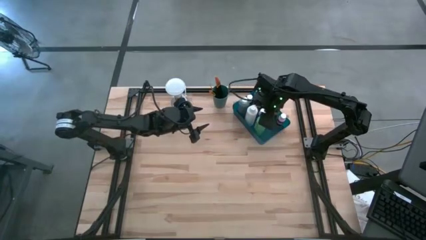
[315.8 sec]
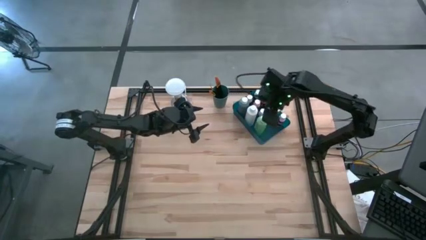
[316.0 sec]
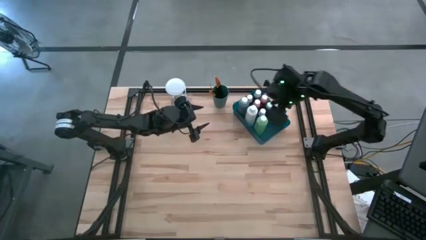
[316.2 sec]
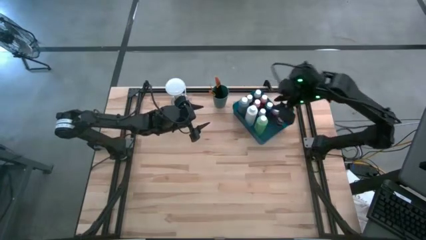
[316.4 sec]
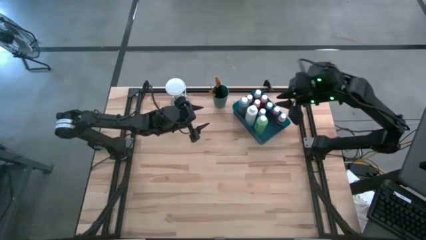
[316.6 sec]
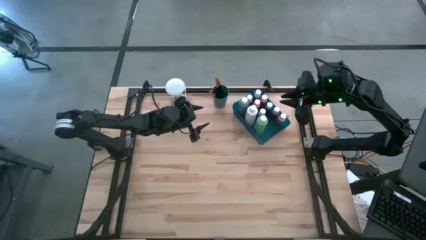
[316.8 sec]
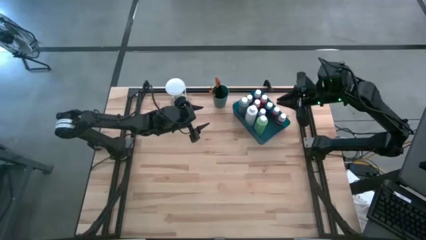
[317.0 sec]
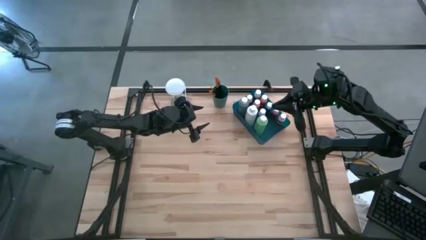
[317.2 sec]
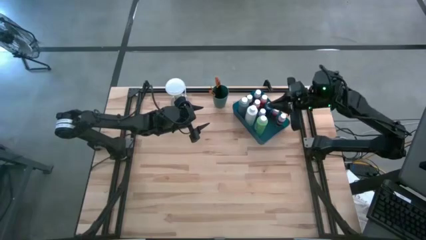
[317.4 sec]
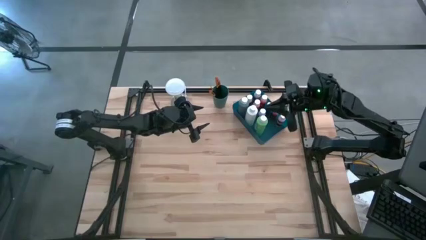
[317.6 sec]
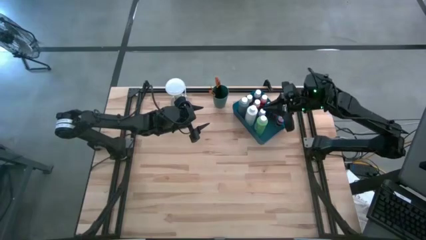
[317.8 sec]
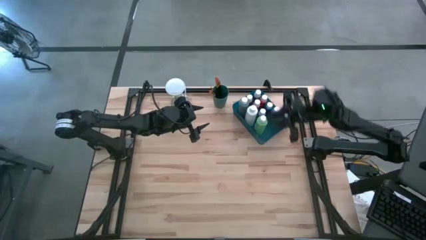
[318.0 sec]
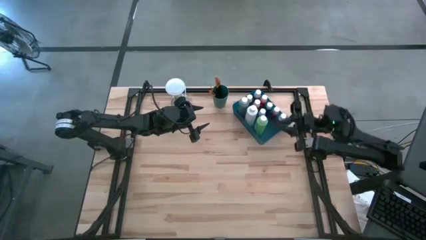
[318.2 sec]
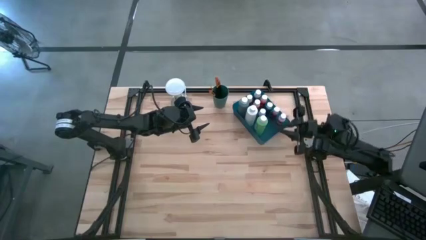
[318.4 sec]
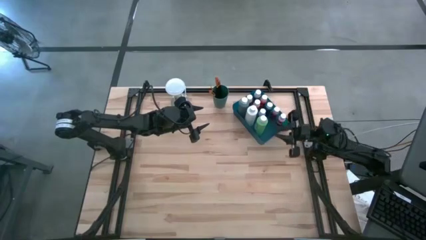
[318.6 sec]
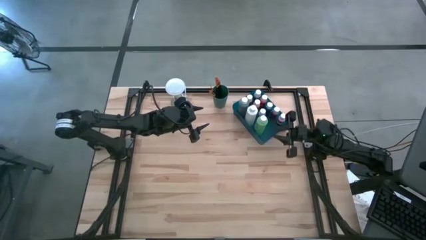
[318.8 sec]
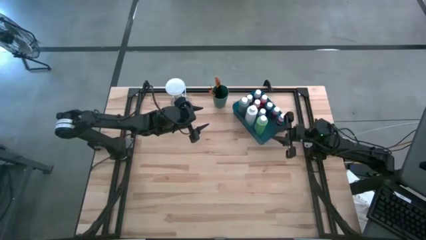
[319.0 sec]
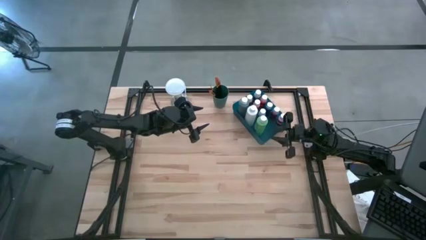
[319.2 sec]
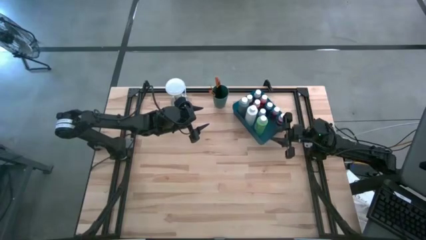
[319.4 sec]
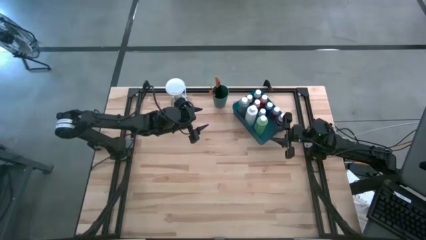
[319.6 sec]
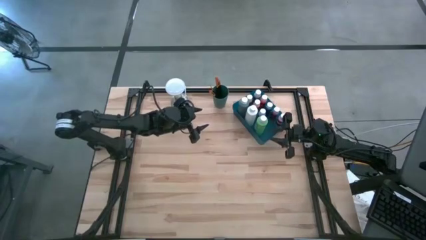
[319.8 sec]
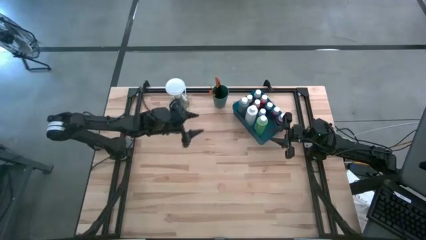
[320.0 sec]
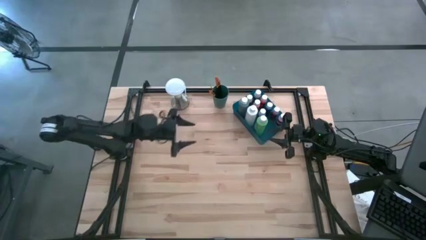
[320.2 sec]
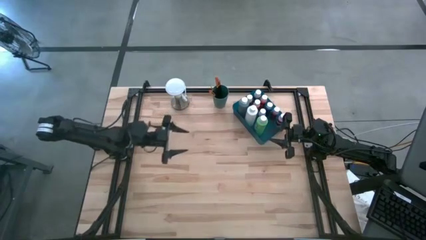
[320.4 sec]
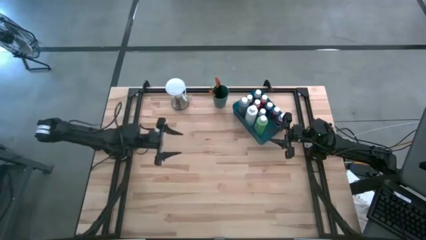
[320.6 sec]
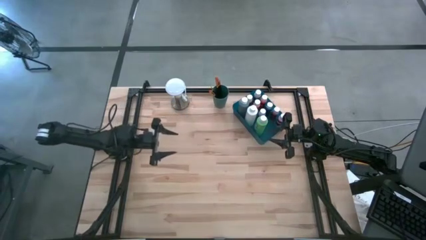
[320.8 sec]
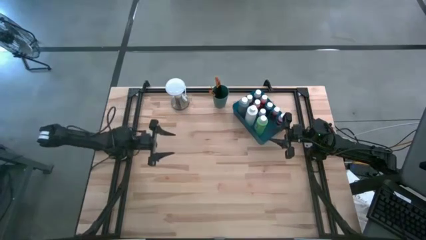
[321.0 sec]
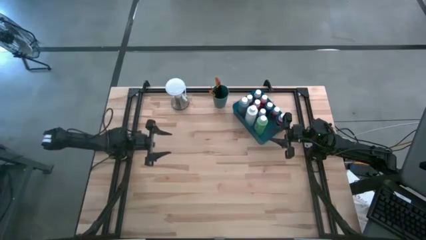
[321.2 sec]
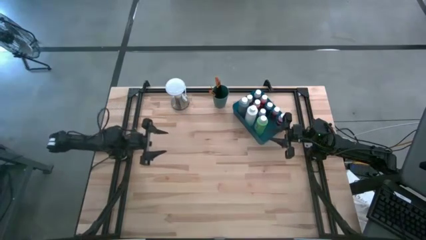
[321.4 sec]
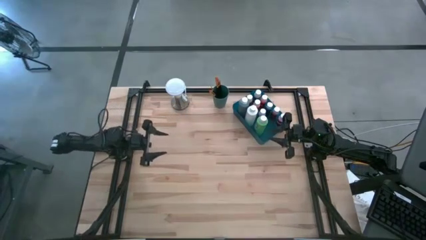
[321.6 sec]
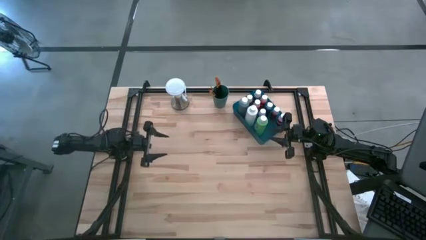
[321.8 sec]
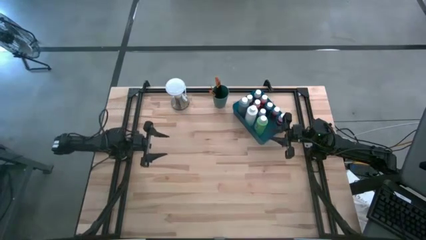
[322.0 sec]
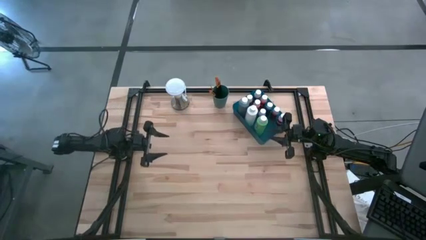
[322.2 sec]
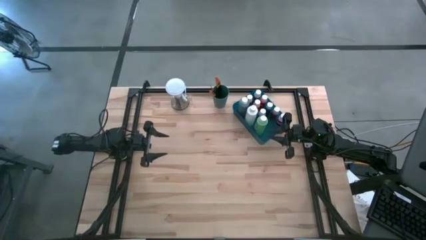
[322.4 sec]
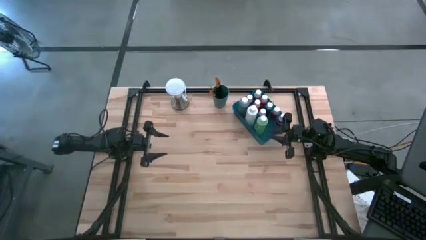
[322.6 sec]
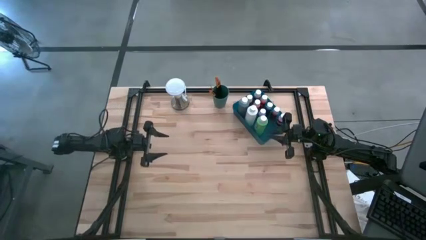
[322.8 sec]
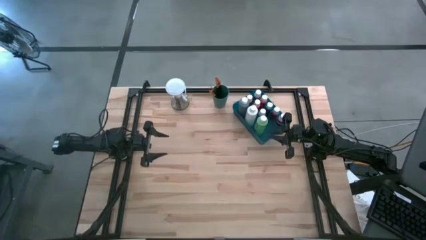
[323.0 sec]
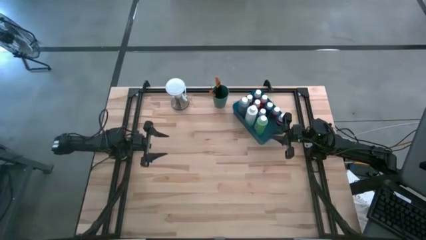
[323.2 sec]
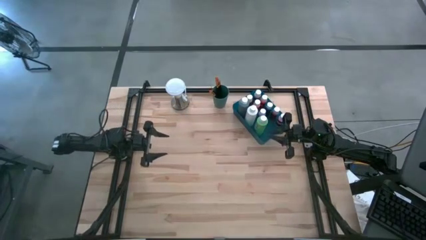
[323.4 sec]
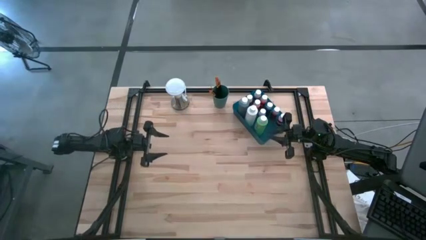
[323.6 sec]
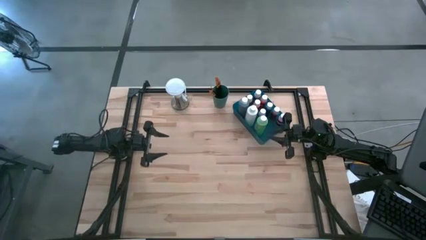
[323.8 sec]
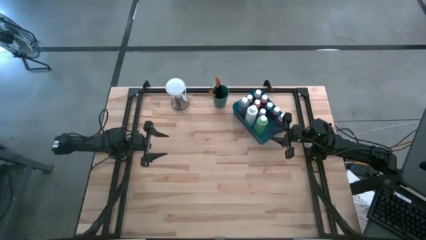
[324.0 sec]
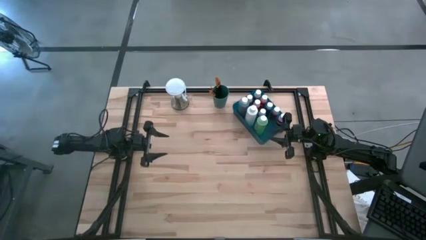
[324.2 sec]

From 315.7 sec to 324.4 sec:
Task: Pick & Place Paint Supplies
Return to Home Position

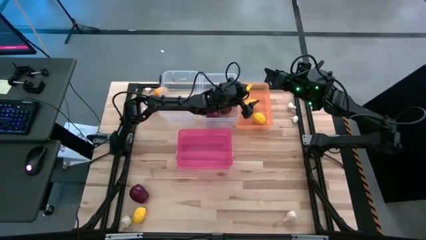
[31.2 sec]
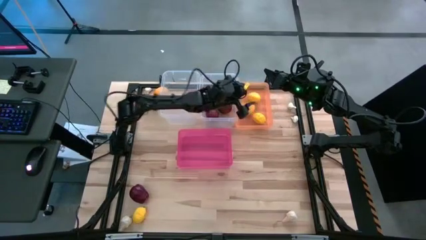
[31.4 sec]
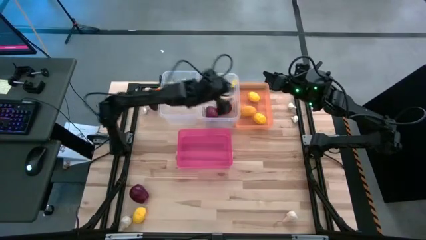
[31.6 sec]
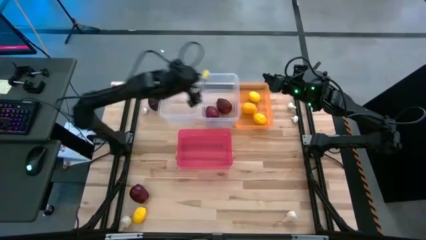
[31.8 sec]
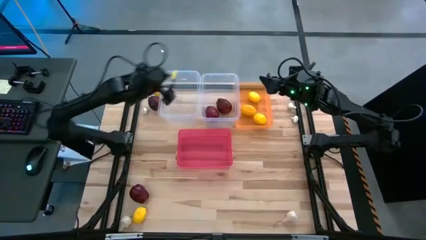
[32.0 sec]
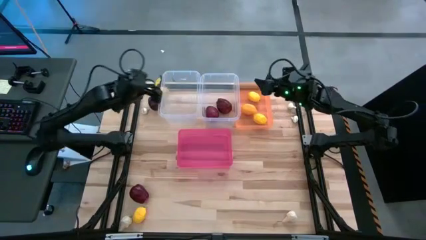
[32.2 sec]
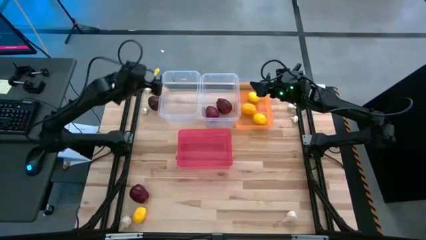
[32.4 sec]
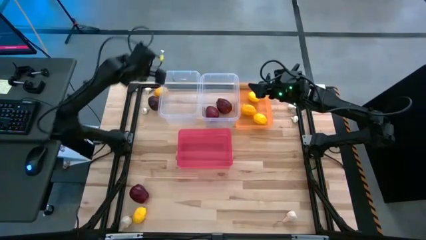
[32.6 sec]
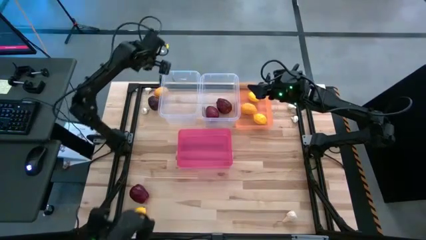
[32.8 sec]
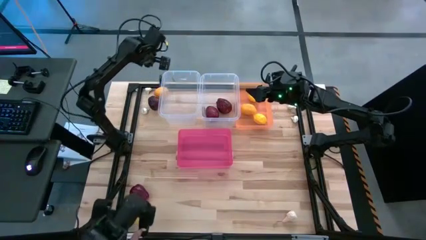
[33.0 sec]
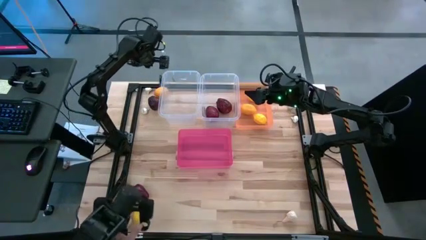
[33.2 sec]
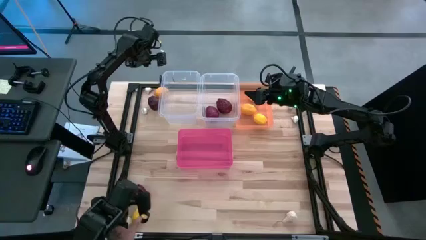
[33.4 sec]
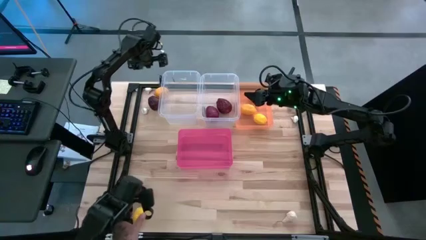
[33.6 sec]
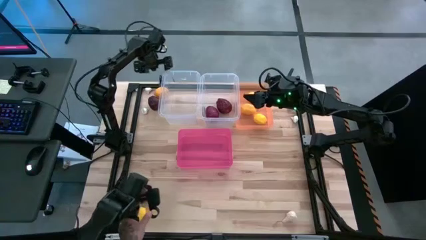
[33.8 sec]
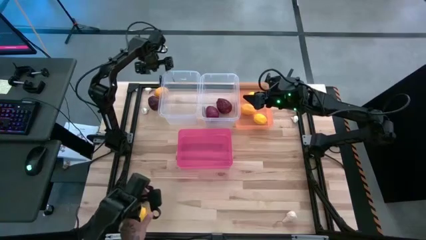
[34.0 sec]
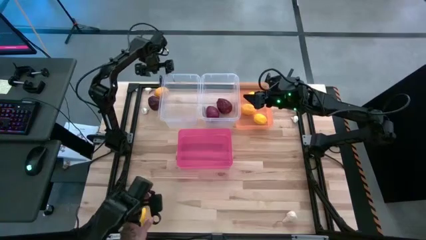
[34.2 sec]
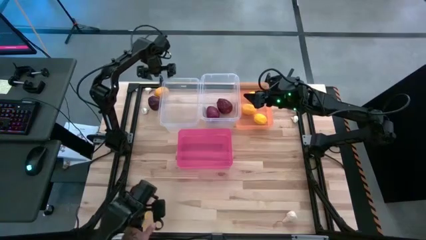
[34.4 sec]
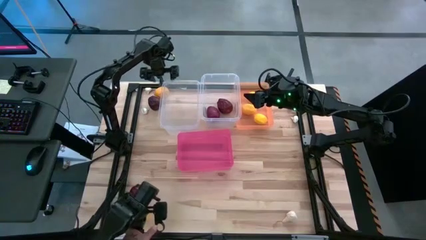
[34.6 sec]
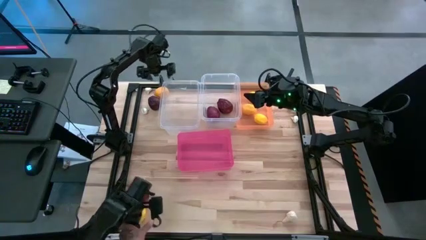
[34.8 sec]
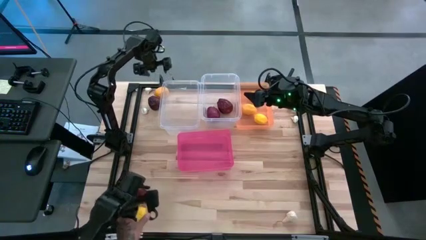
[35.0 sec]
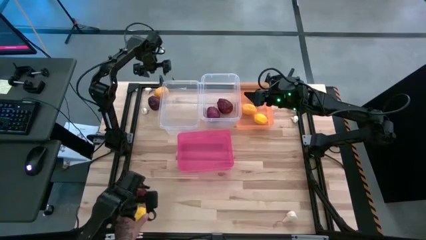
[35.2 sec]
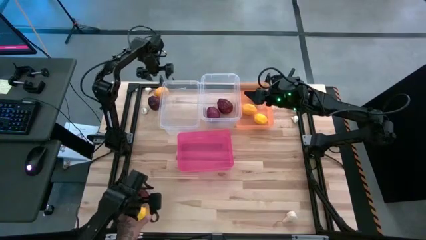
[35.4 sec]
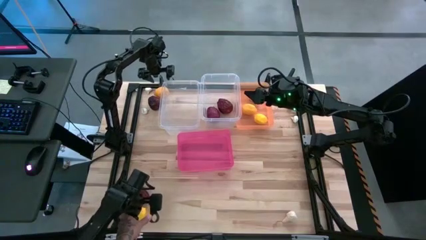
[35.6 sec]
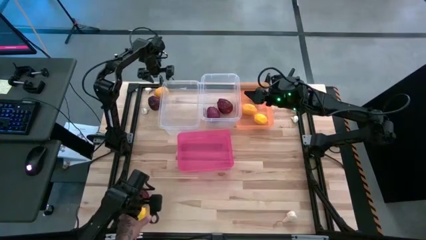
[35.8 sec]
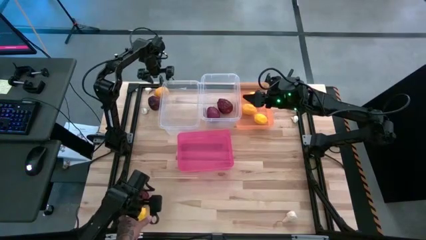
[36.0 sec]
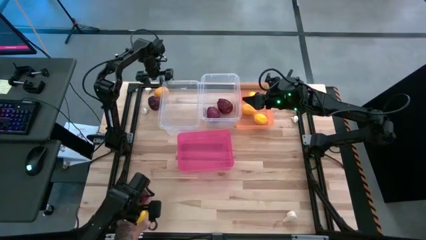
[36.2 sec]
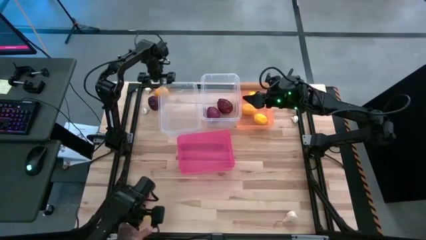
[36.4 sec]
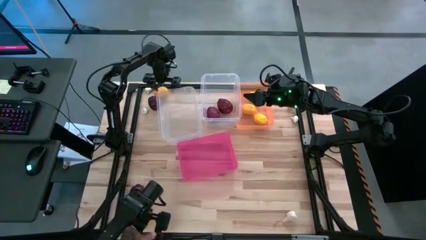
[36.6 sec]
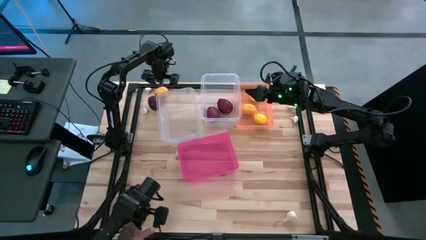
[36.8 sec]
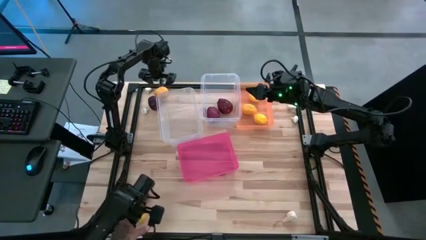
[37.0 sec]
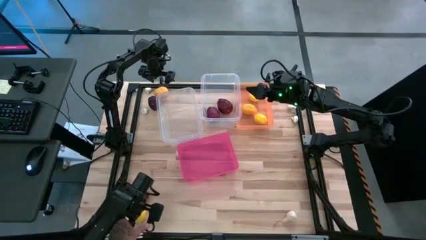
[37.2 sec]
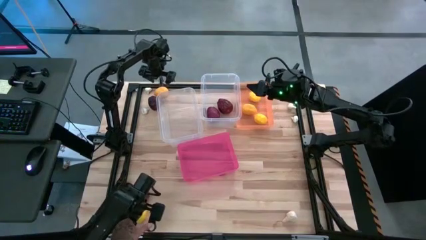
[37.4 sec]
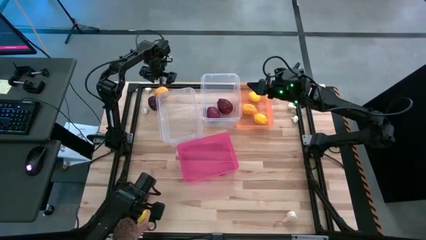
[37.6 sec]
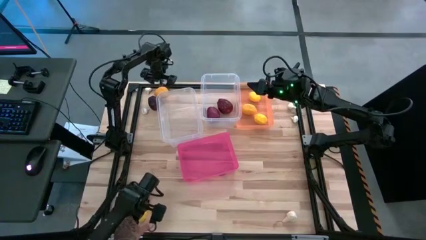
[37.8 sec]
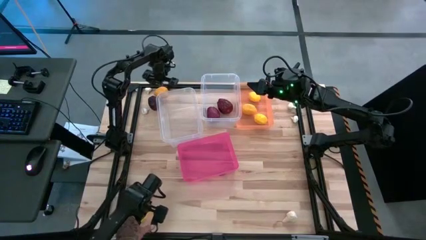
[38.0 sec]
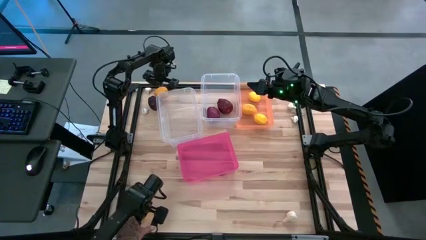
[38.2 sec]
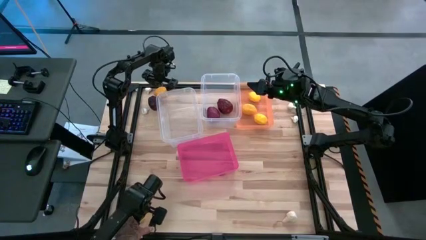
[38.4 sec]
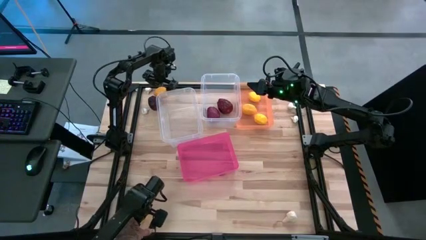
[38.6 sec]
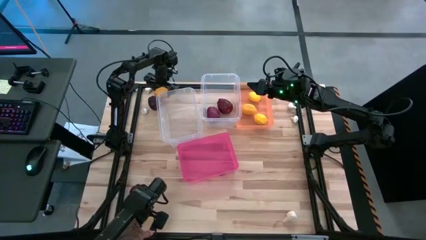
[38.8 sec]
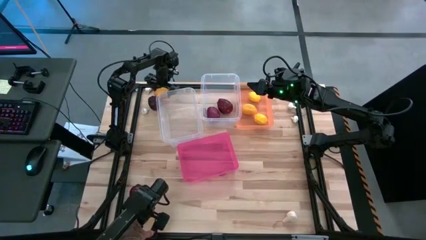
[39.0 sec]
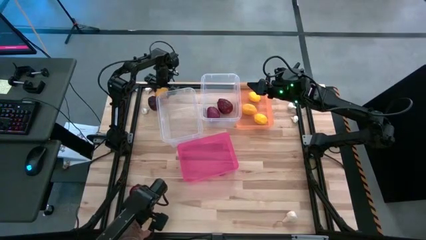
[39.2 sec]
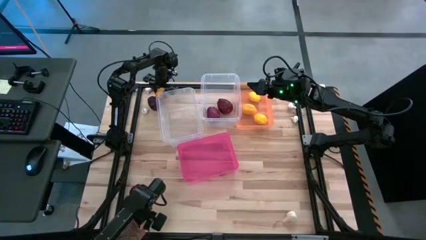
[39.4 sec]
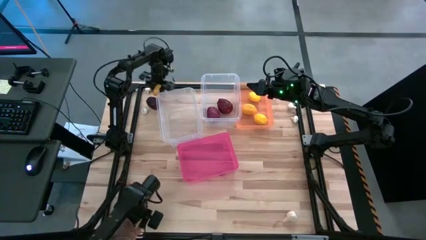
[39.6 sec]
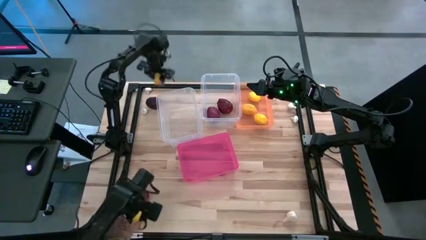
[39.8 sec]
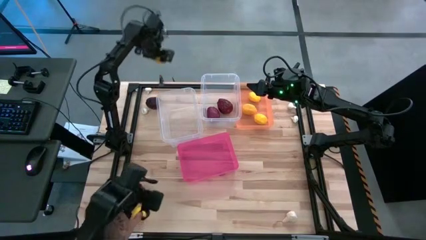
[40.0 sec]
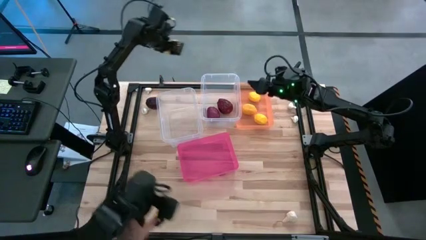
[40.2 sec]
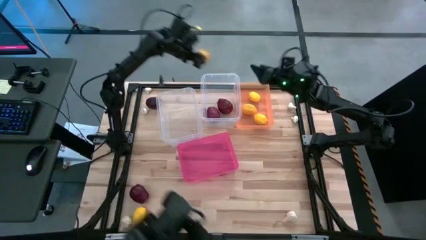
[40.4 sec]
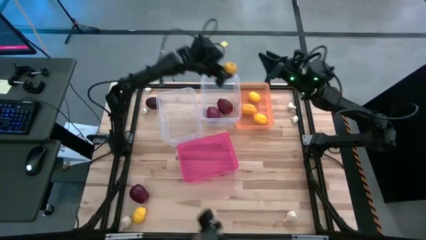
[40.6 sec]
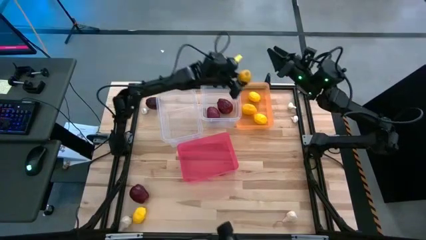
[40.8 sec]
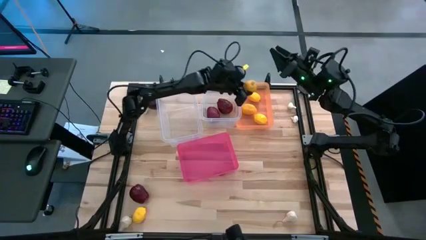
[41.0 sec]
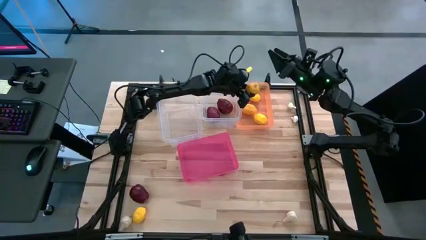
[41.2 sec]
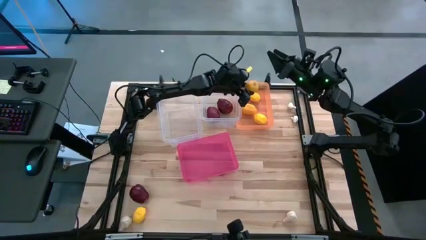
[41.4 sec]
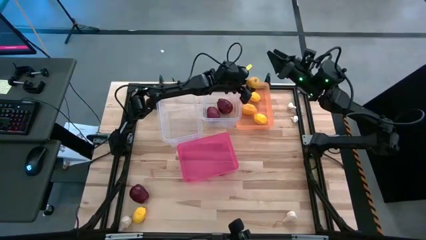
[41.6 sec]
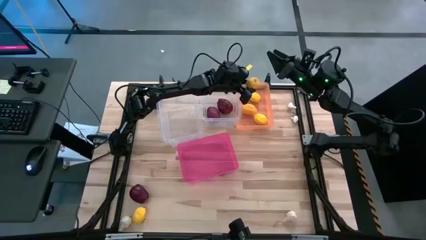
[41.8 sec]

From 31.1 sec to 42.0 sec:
Task: Sort produce into baskets
Put the yellow lemon into the orange bin
